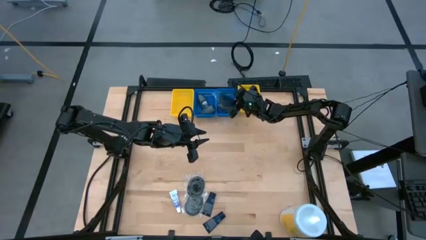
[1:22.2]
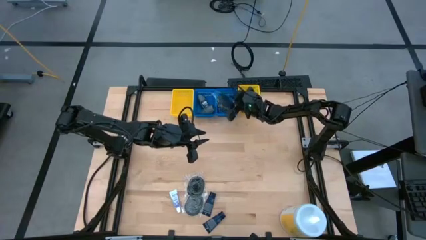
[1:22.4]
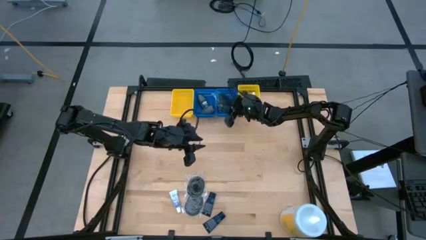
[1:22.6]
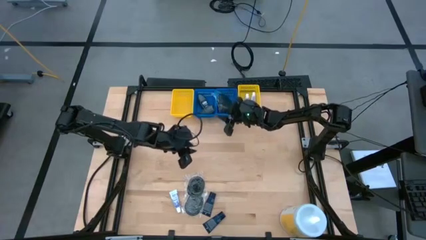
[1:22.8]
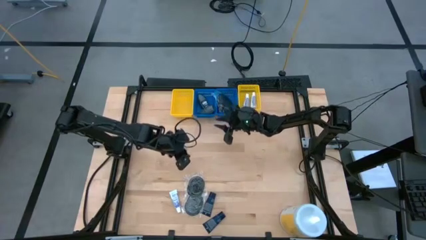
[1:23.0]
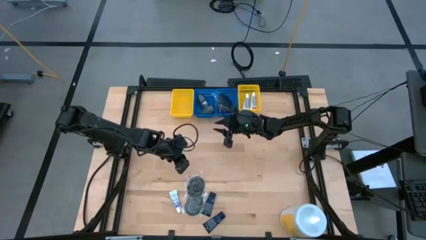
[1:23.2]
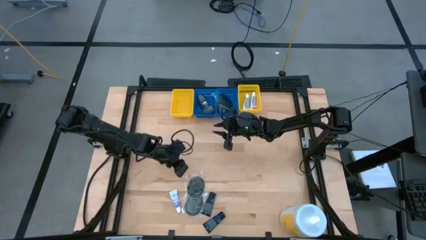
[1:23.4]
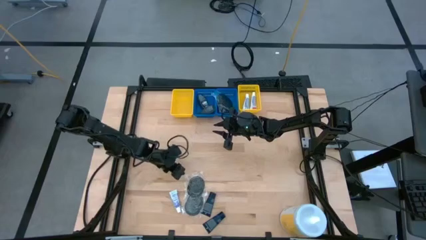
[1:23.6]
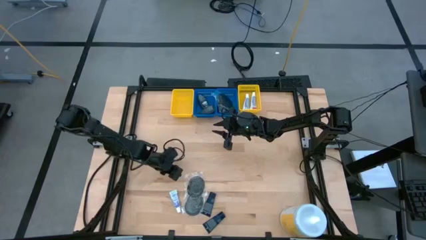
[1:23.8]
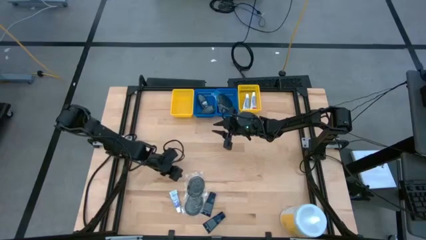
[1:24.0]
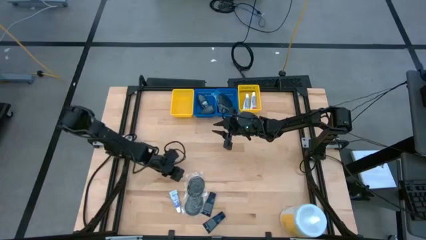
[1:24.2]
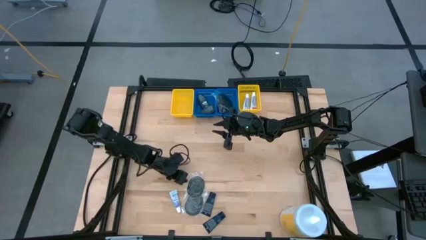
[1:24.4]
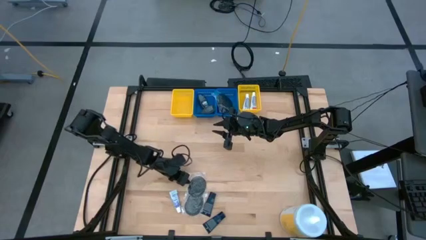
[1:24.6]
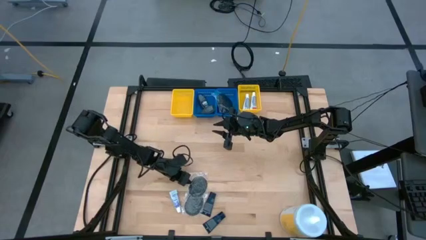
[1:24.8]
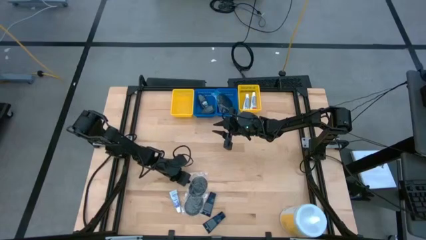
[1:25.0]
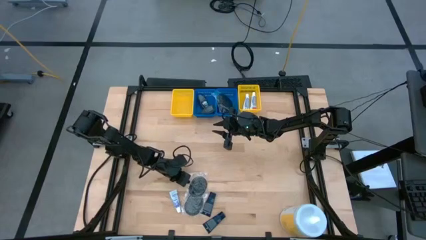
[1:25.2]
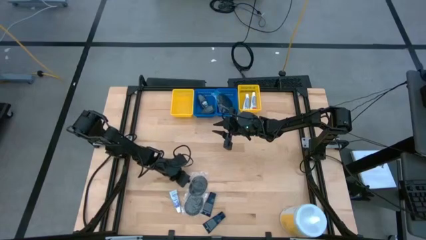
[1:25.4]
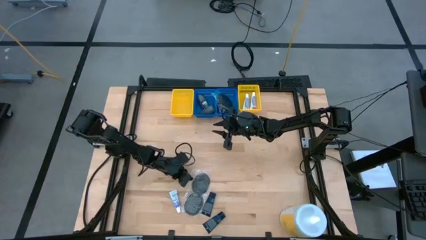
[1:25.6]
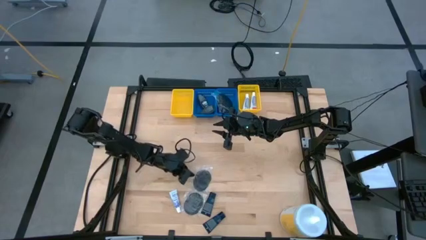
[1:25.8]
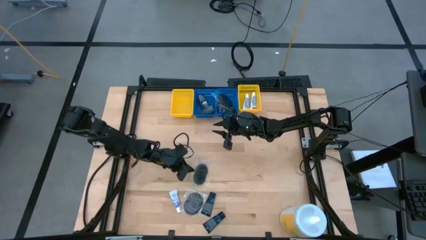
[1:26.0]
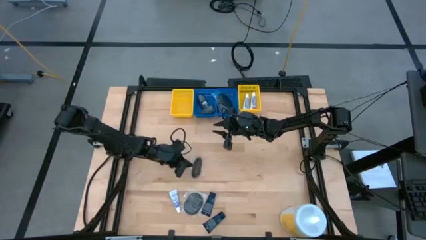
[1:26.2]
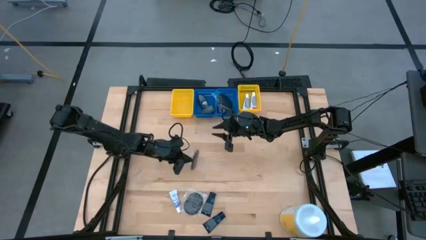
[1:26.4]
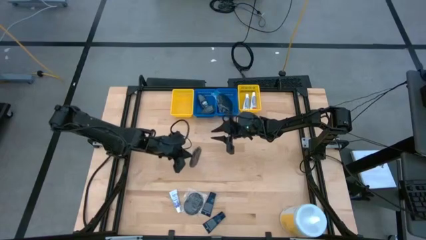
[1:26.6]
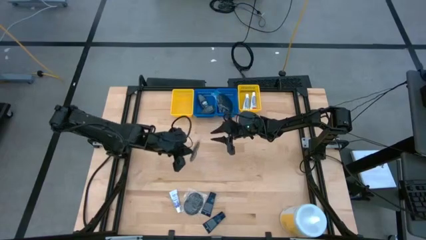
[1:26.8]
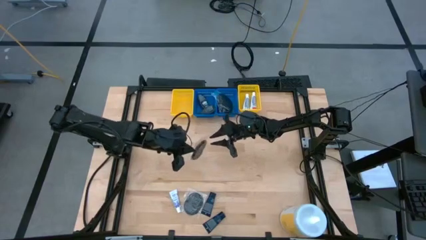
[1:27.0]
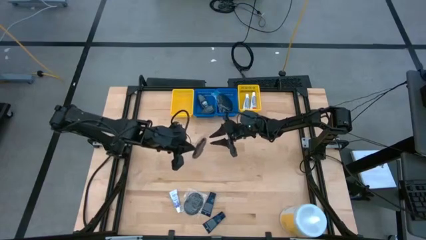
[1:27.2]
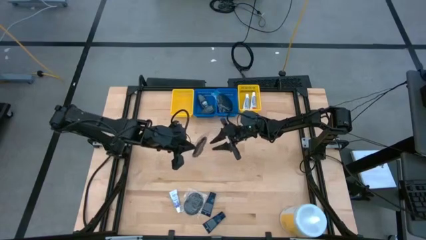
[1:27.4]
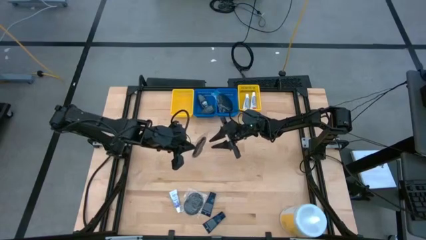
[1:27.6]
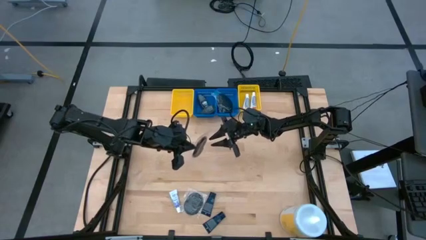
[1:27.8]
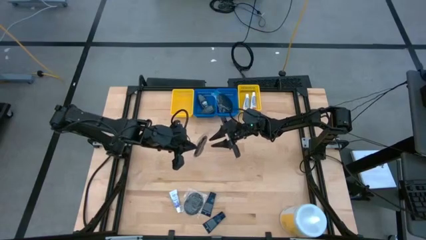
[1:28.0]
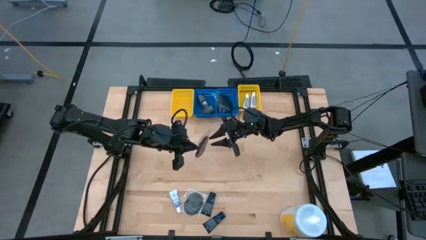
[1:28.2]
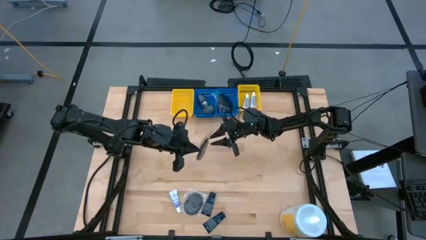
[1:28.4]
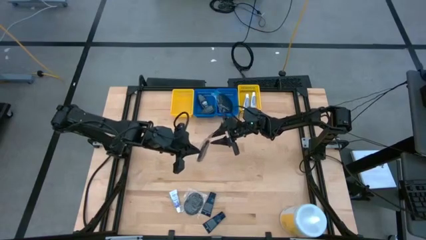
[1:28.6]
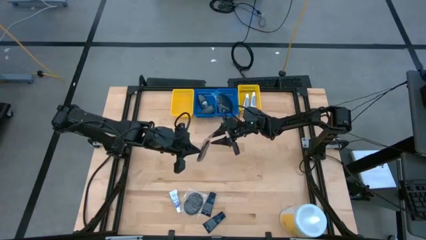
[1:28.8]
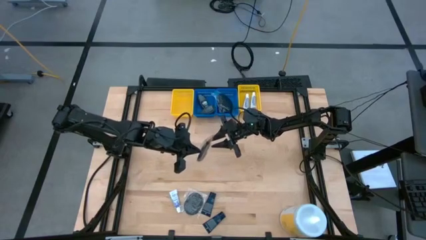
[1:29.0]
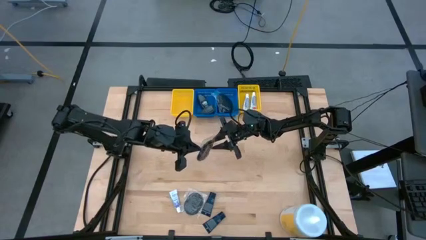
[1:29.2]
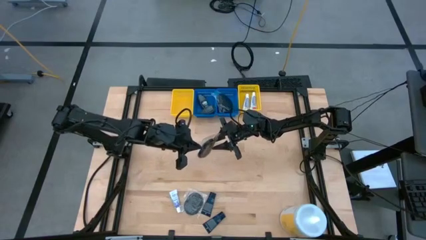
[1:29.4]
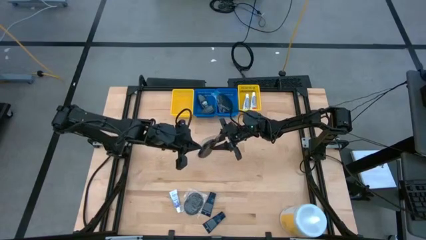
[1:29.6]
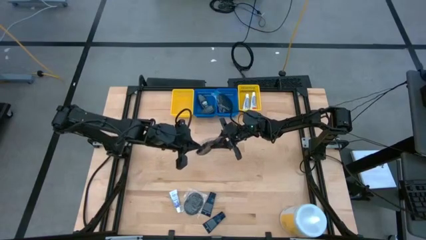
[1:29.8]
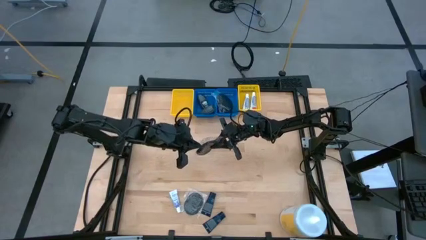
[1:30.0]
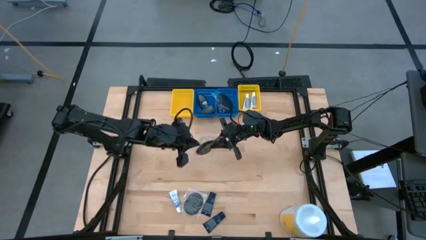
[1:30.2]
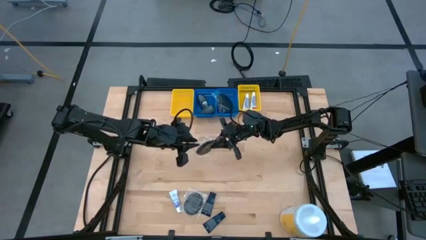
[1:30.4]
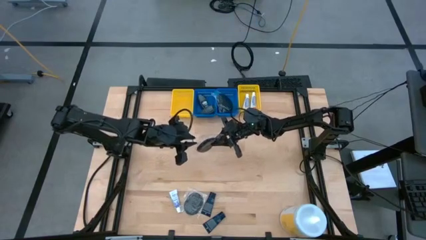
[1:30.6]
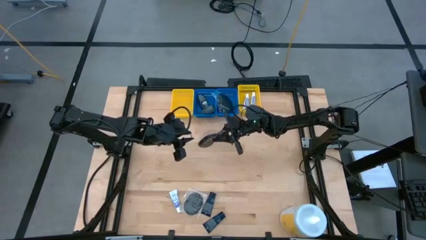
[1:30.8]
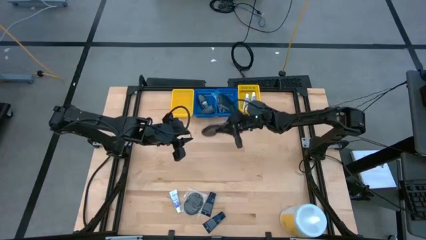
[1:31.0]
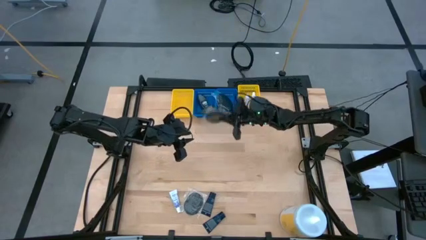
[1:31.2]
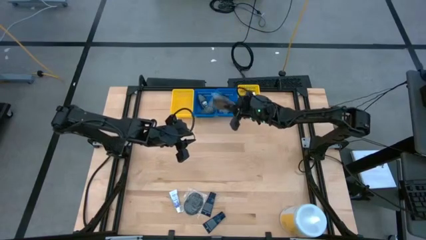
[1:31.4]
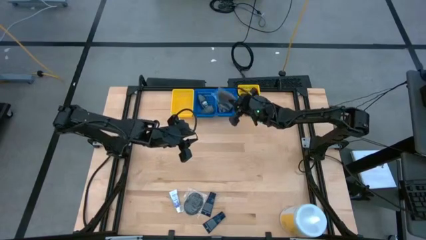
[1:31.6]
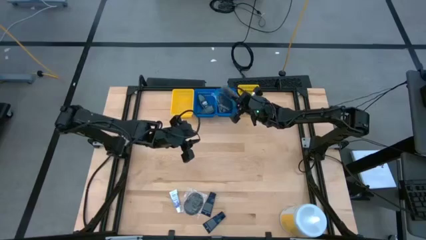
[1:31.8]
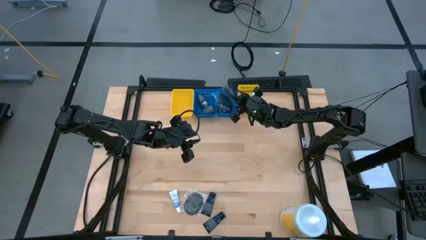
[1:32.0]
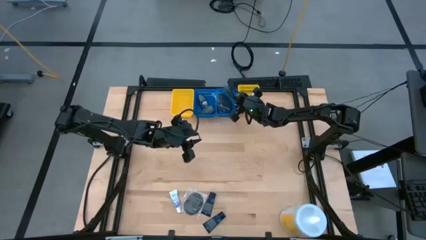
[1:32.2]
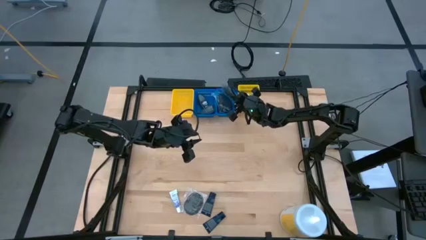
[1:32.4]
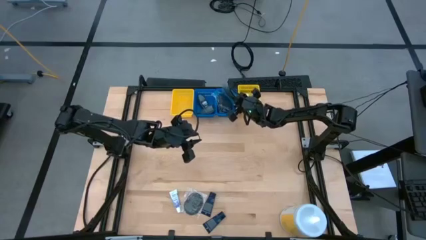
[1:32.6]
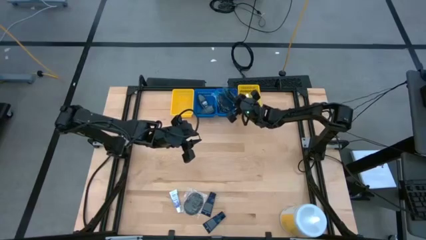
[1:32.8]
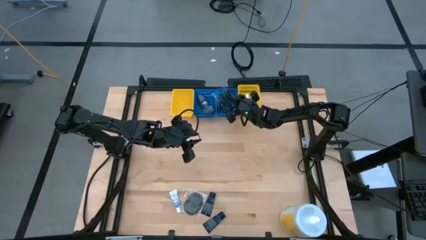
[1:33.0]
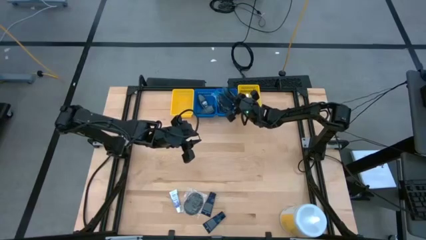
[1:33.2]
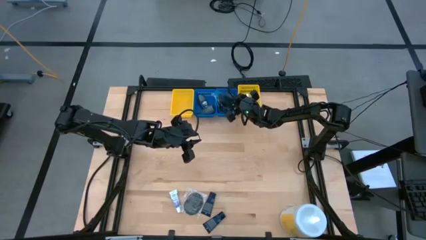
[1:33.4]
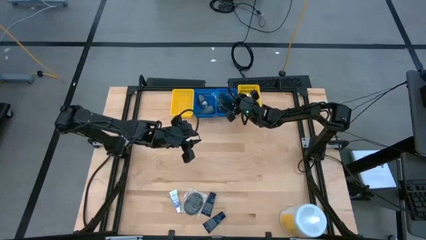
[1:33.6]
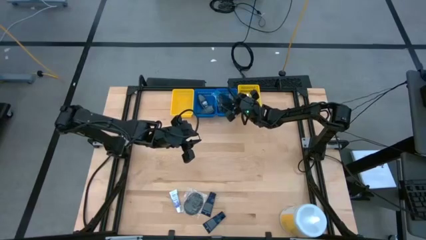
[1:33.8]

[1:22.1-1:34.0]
Task: Pick & Place Travel size toiletries
Put the black hairbrush into the right blue bin

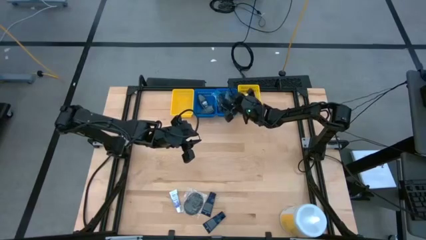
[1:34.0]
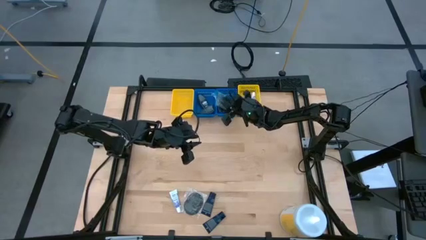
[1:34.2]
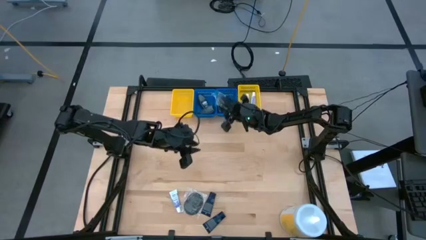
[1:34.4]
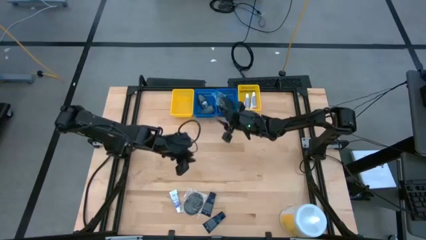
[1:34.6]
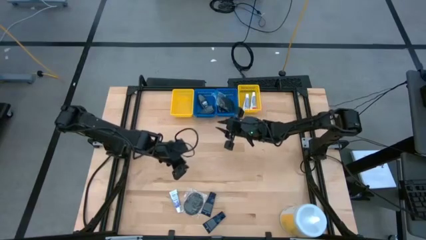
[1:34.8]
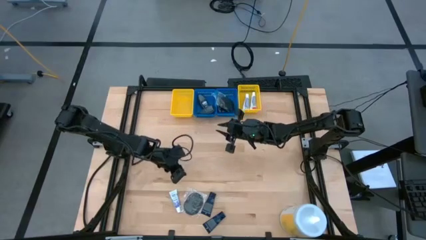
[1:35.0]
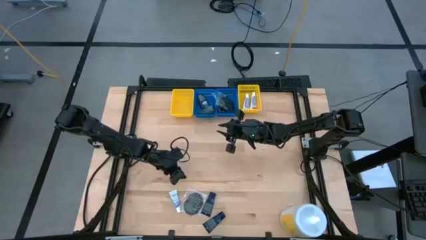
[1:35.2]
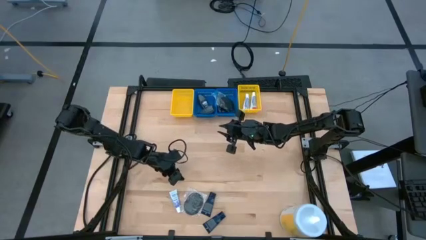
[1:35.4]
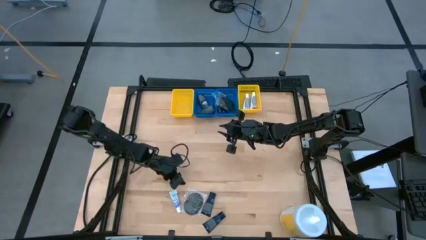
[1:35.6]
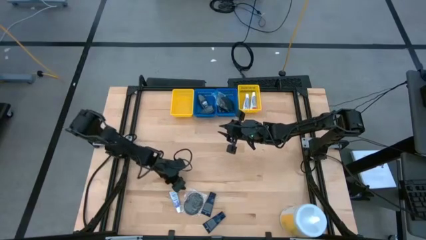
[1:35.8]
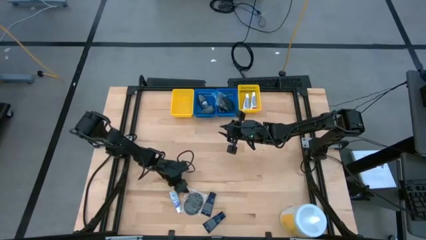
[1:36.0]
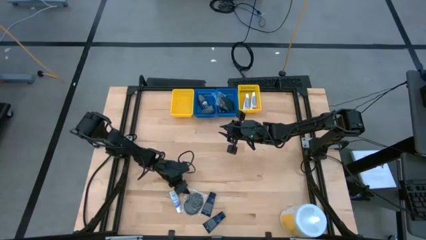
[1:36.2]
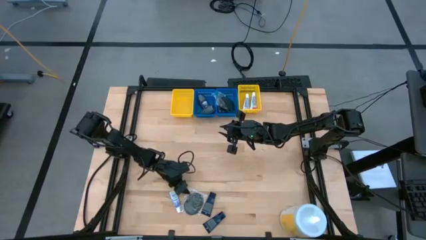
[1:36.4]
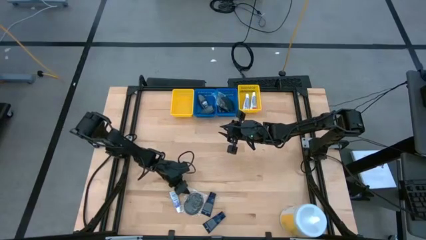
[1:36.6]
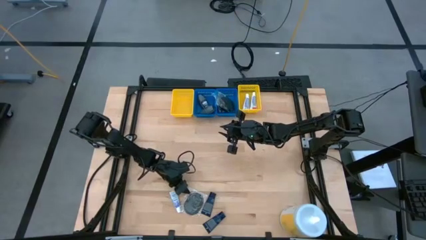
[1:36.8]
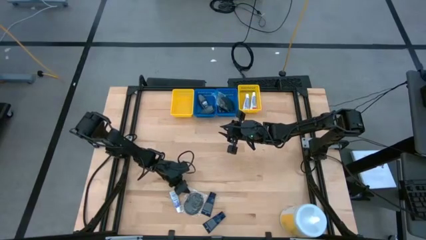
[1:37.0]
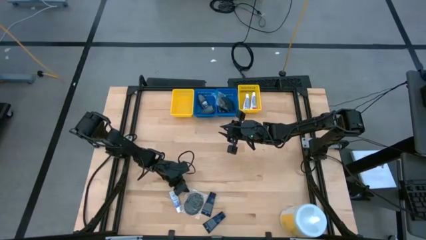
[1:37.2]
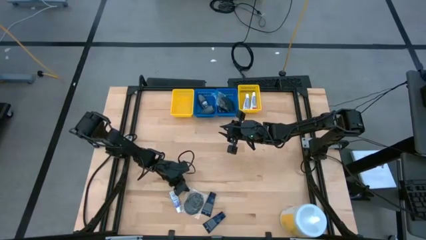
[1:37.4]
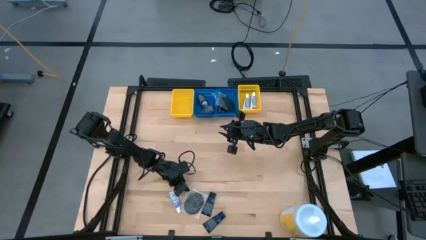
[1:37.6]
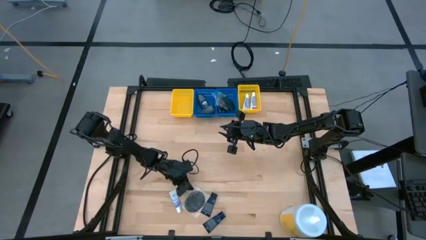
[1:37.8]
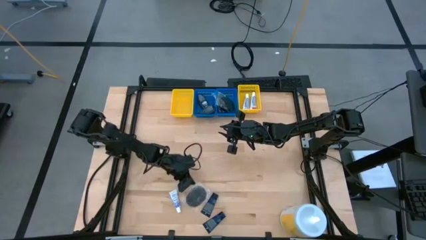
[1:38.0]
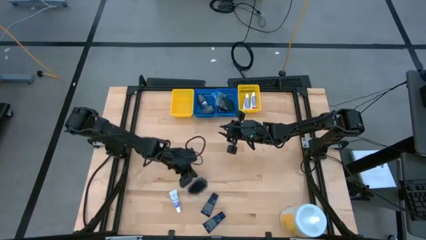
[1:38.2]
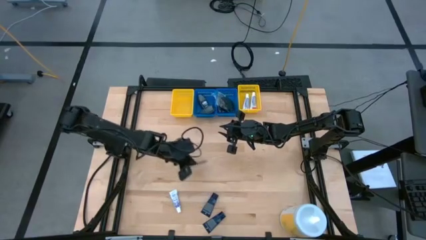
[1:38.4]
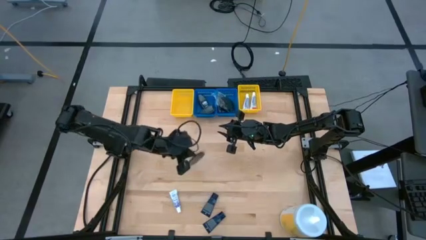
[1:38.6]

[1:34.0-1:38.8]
Put the black hairbrush into the right blue bin
